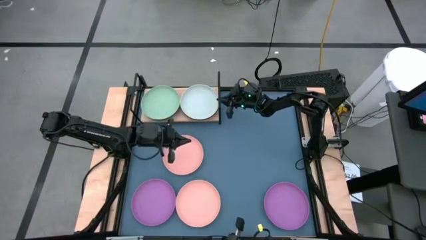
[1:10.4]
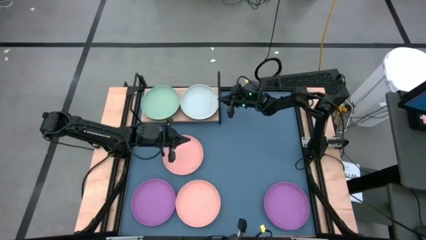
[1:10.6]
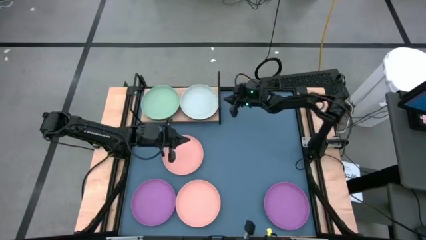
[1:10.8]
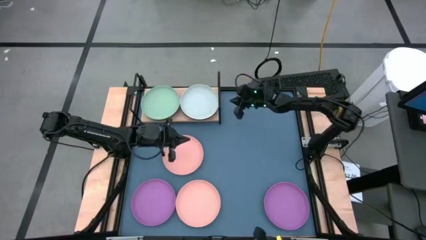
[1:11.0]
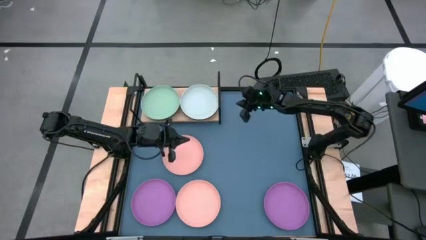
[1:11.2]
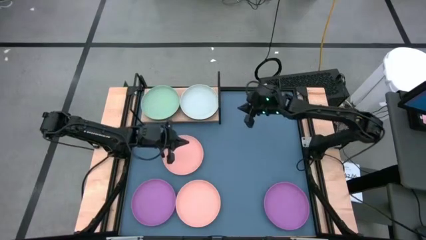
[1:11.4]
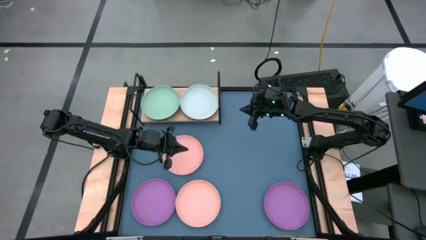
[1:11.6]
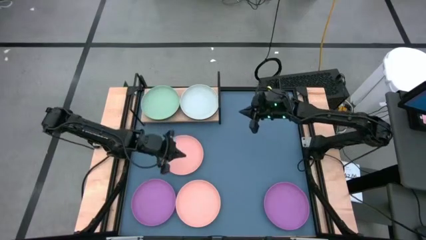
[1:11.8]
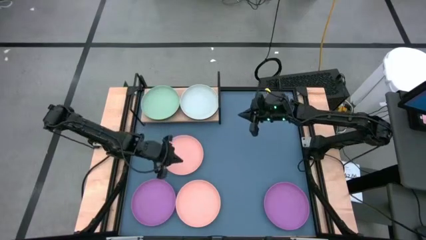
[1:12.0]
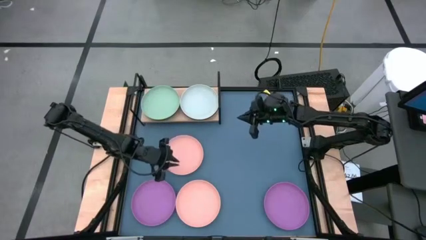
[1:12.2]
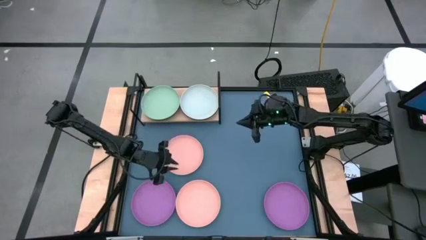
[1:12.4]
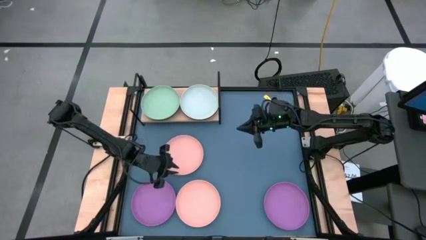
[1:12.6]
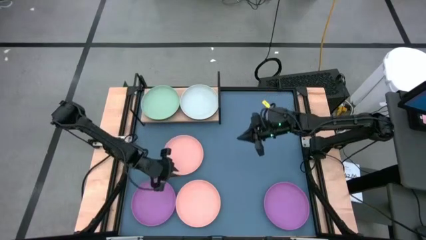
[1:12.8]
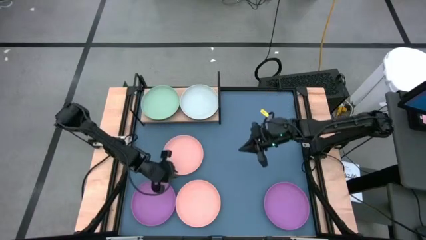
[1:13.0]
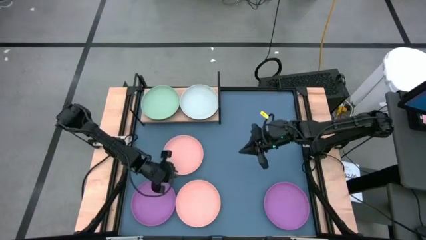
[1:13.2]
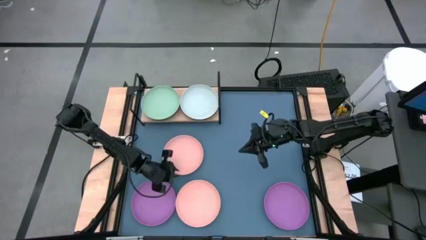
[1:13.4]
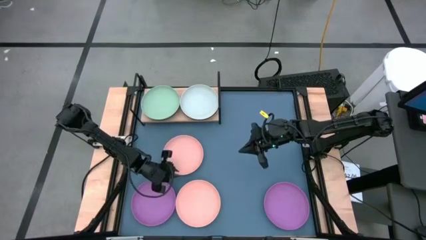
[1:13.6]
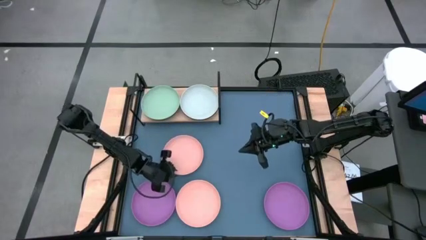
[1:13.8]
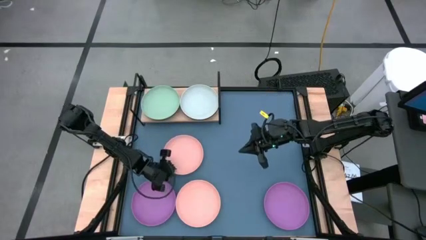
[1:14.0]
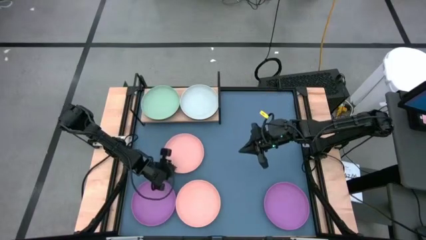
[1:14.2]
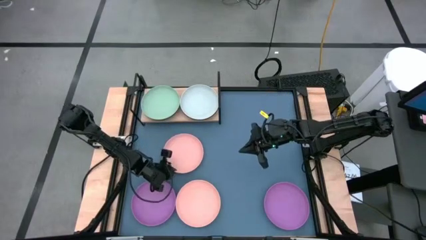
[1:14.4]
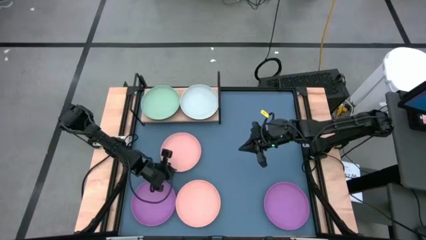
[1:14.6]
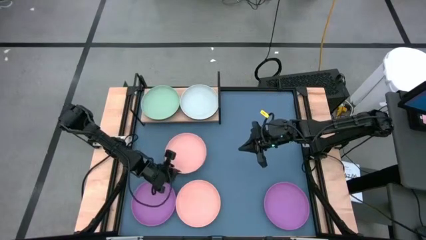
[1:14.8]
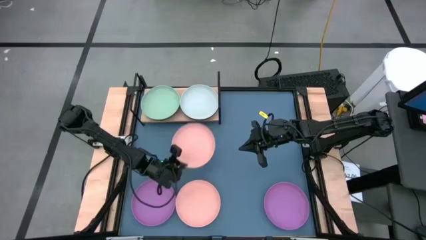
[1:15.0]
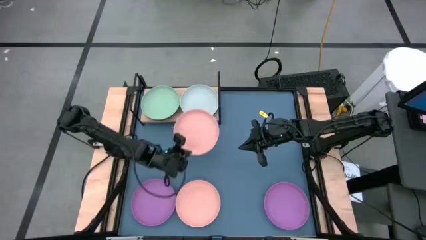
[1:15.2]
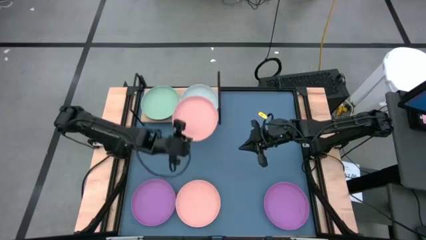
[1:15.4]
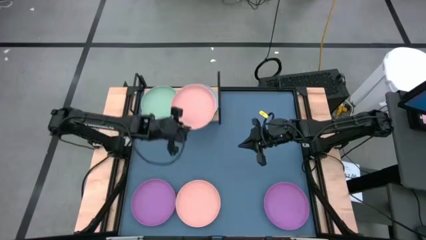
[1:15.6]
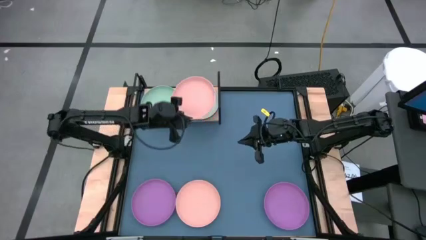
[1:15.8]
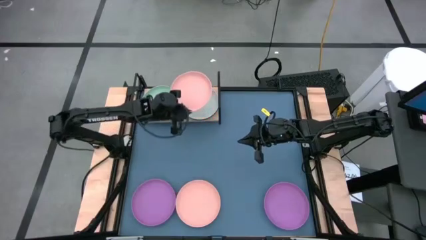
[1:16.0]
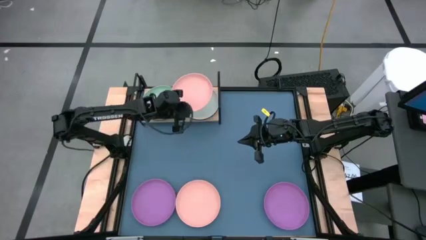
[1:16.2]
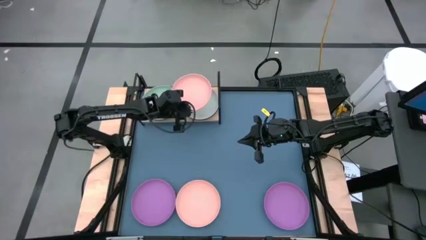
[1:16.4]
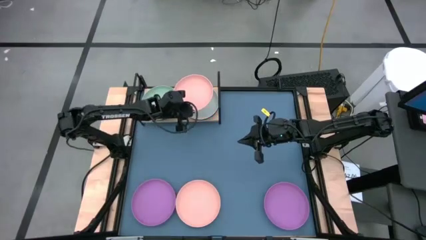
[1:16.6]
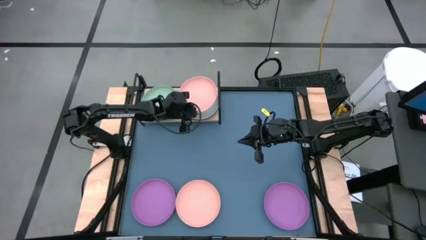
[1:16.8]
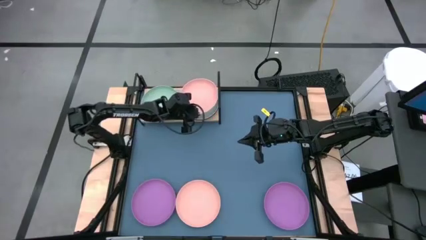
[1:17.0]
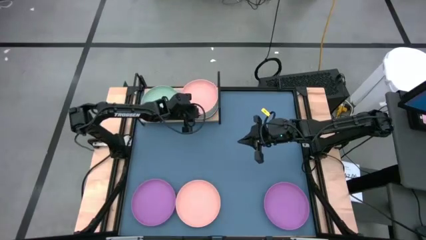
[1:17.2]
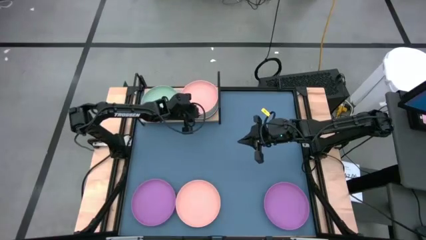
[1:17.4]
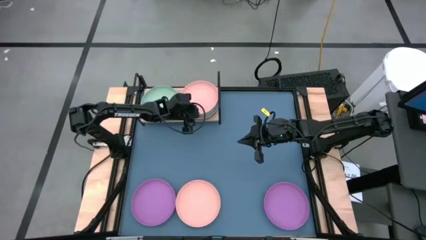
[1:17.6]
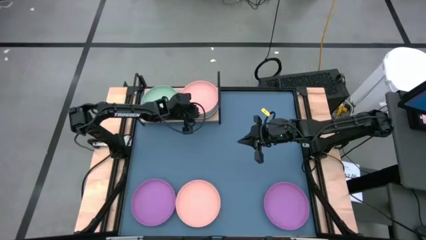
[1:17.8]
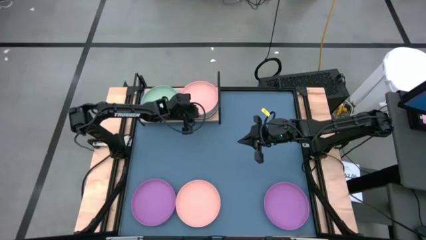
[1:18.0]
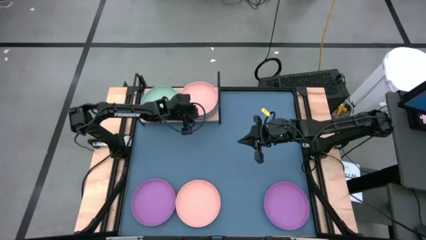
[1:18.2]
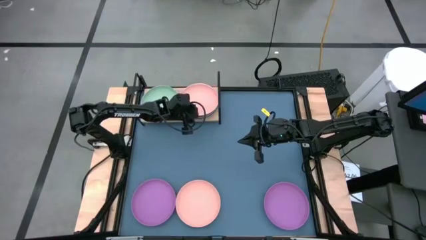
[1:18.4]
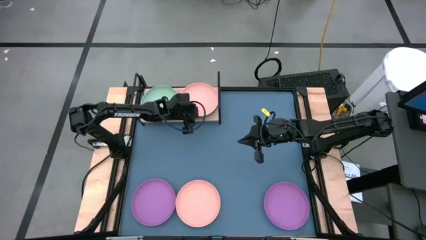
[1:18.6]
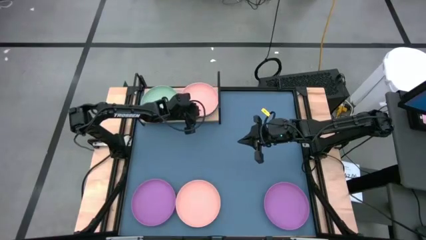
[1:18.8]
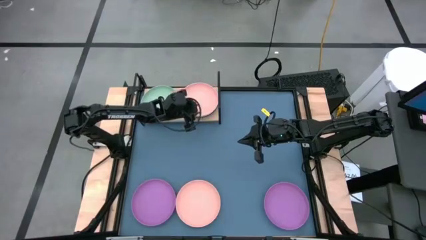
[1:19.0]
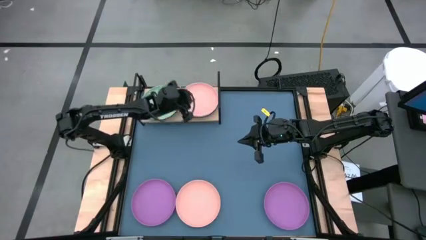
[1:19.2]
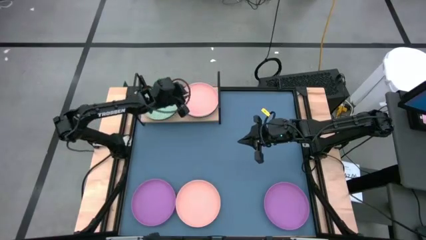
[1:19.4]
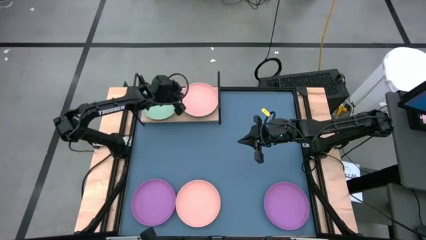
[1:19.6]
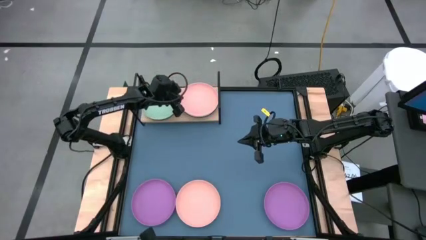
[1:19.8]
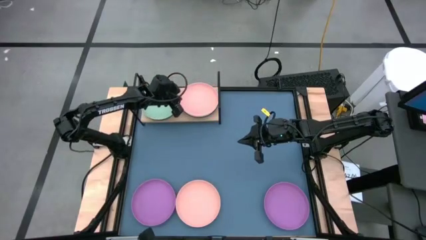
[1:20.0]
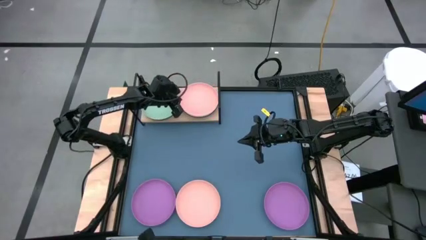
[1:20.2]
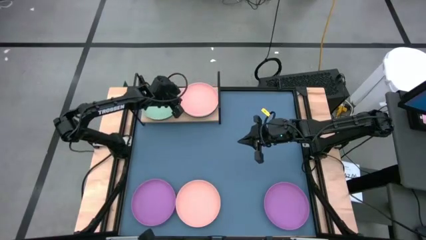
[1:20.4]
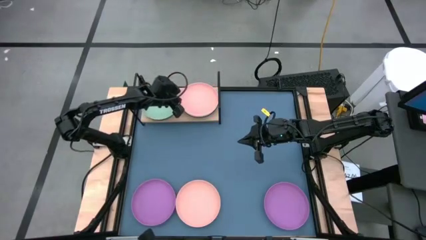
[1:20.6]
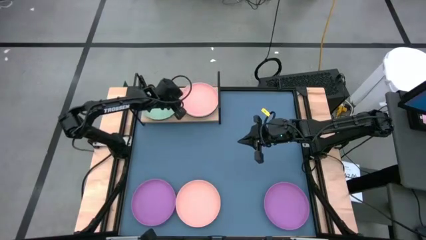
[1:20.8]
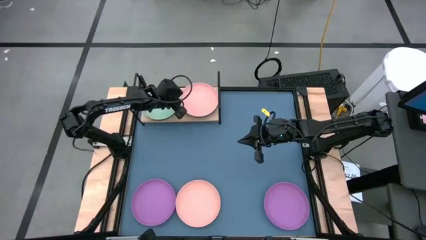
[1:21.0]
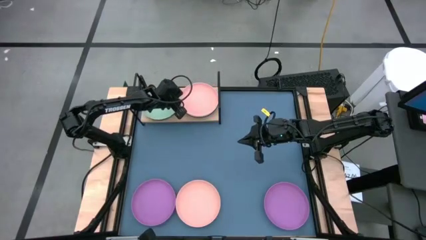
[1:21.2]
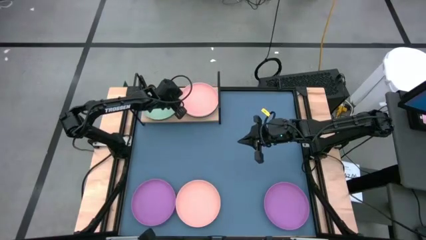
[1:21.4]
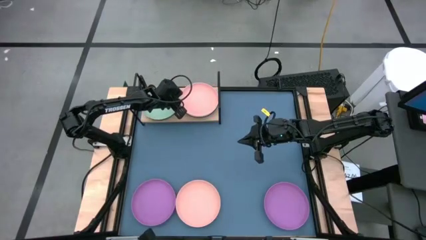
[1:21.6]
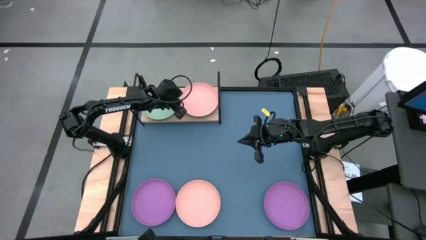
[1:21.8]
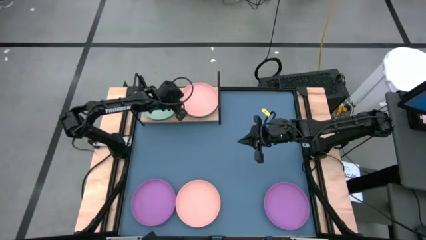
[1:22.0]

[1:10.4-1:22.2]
Task: Place and stack plates onto a shelf
Stack the top light pink plate on top of the white plate on the shelf
